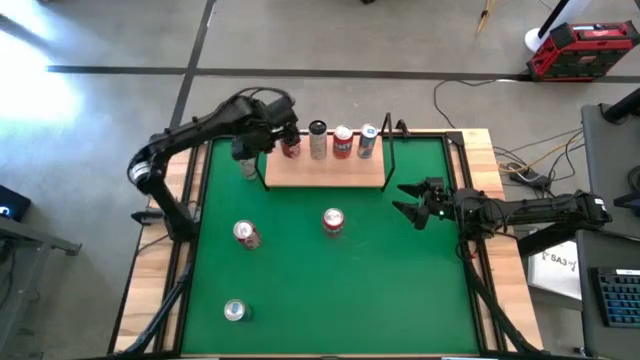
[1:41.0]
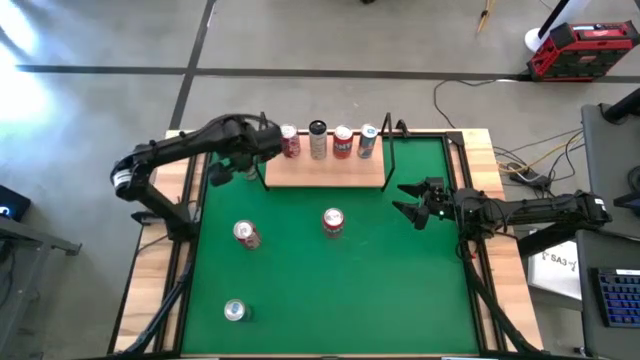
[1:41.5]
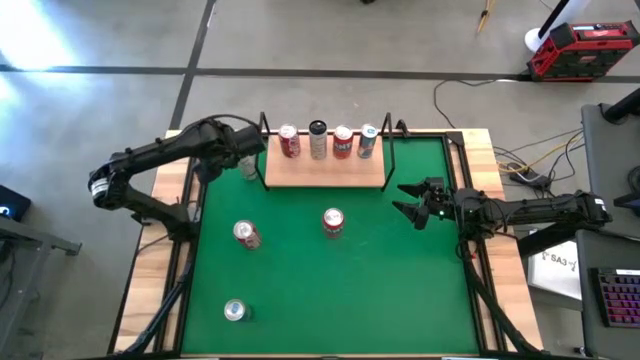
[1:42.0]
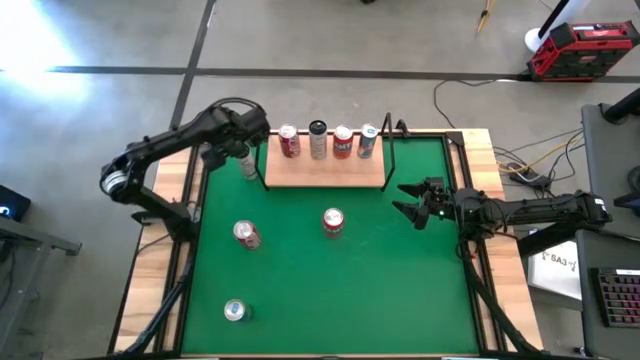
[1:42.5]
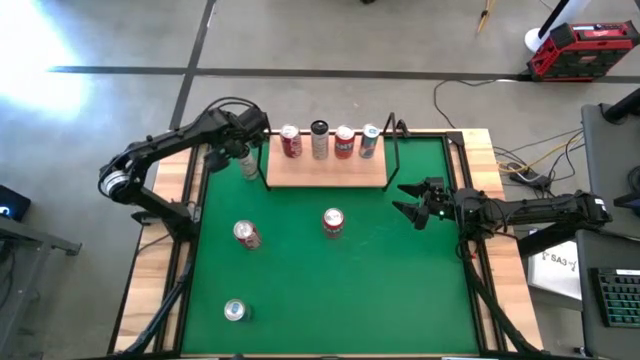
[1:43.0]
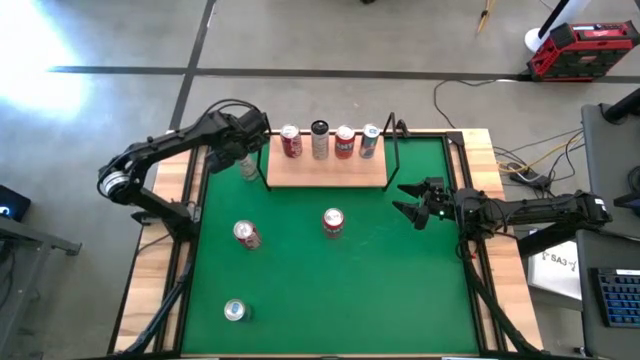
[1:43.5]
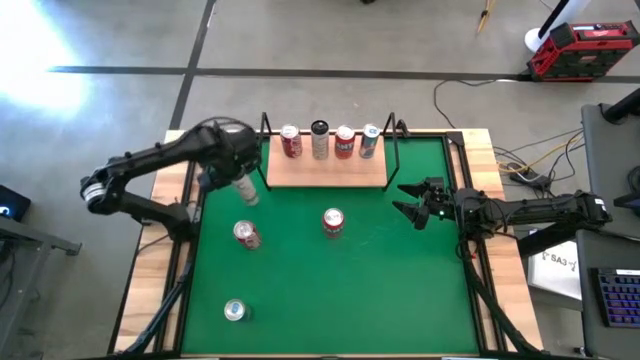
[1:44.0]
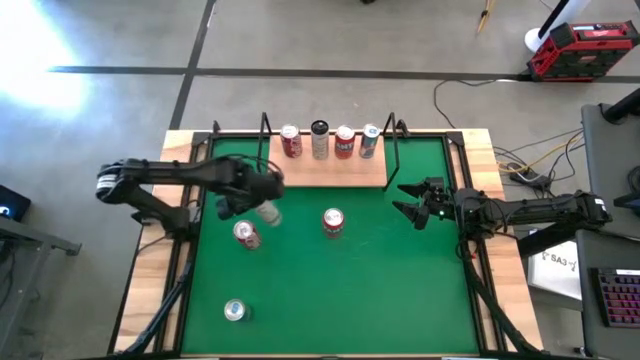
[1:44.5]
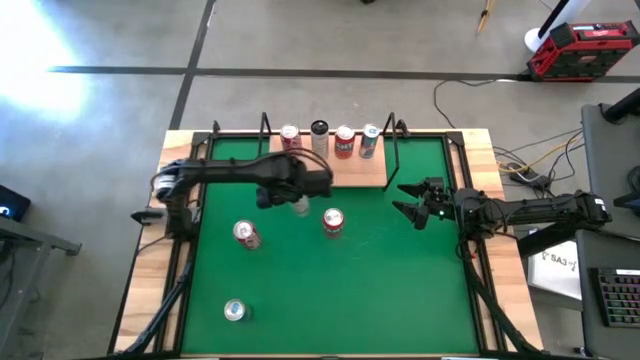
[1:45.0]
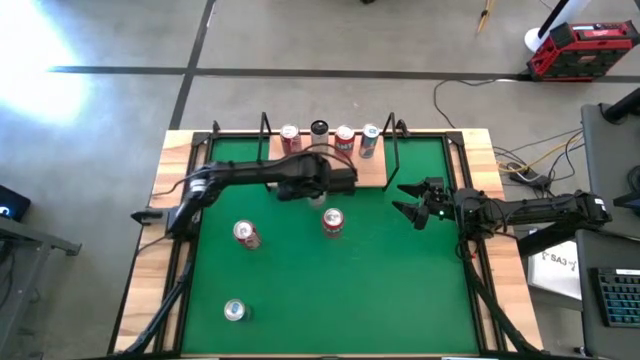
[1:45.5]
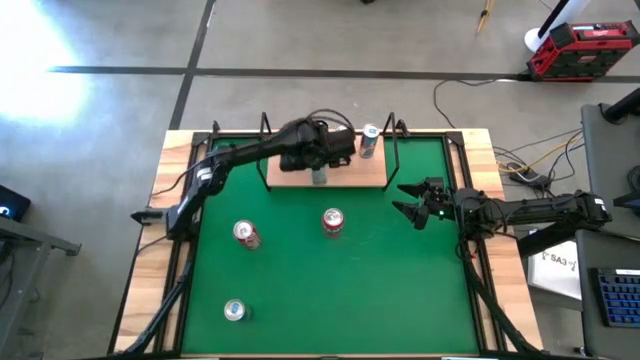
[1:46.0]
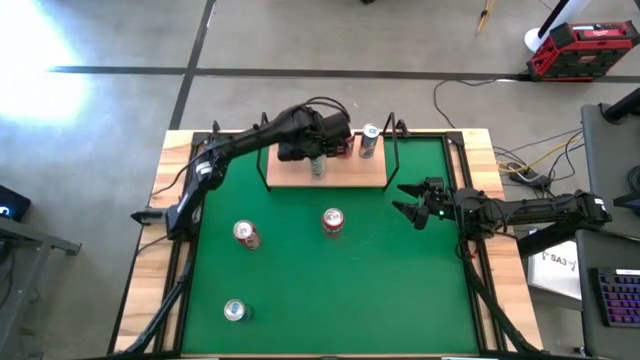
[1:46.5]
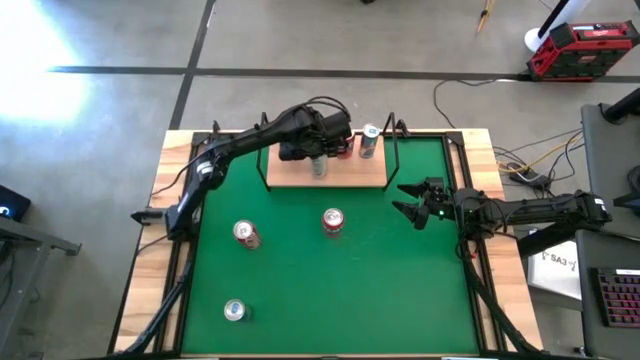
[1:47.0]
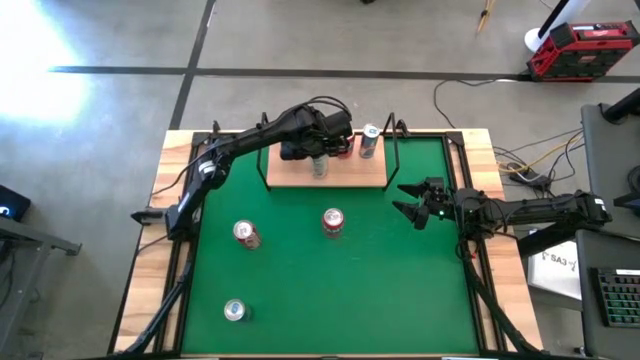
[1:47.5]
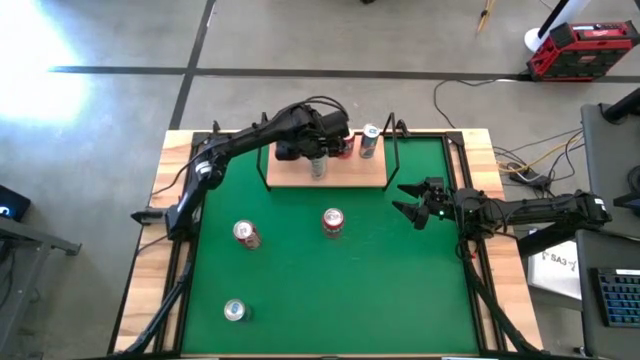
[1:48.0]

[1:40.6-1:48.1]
Task: Place canned beverage on shelf
Put the white-yellow soda can on the shelf aligned with the other white-yellow soda can

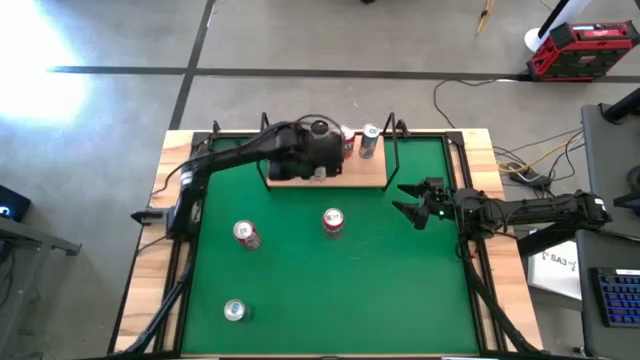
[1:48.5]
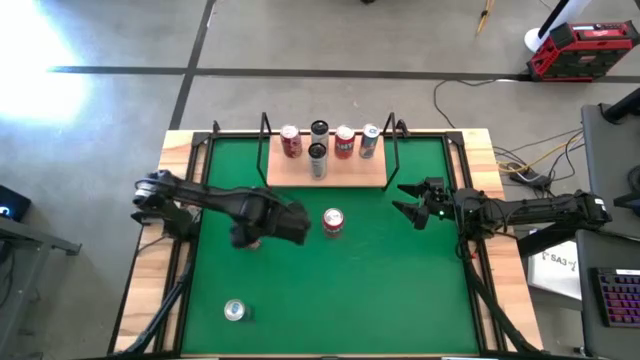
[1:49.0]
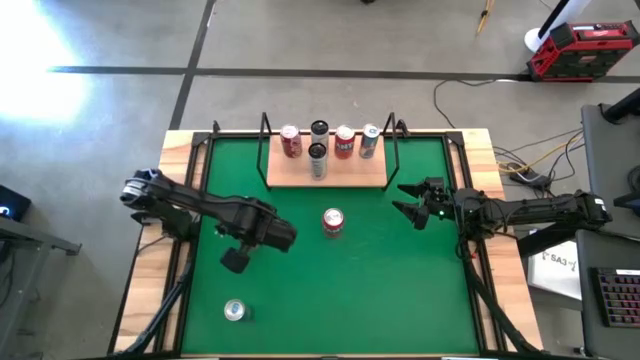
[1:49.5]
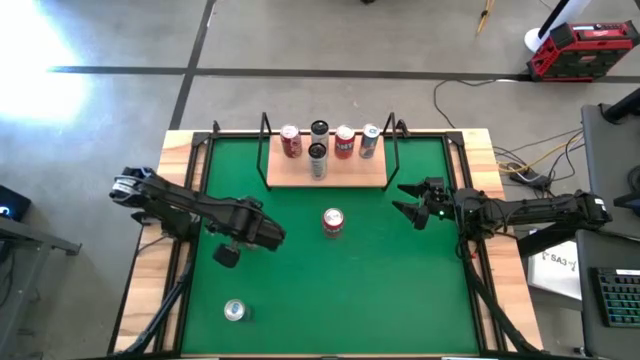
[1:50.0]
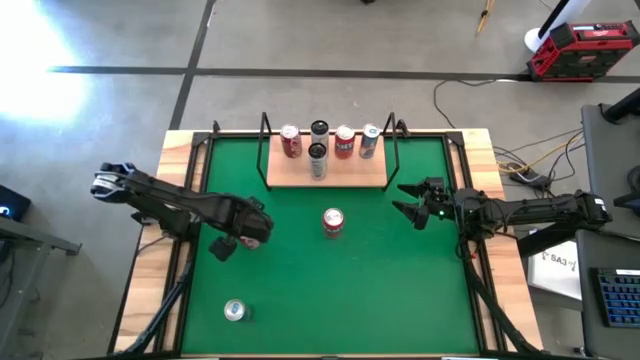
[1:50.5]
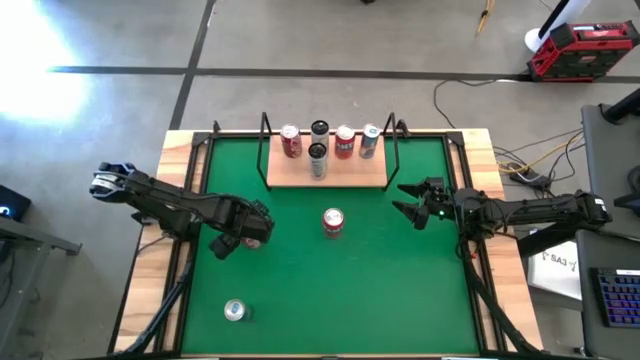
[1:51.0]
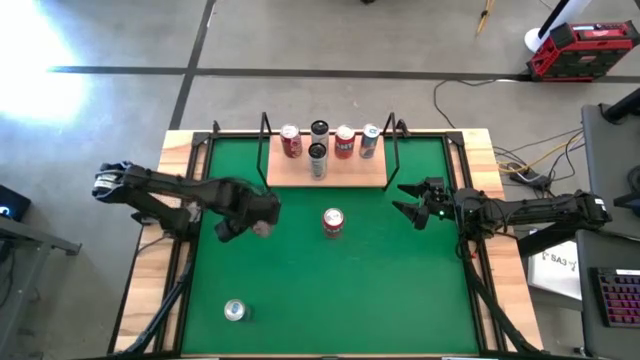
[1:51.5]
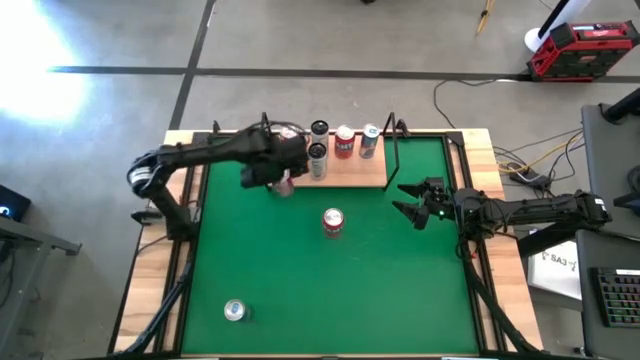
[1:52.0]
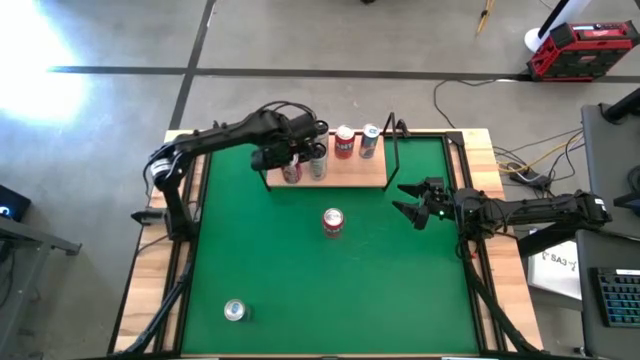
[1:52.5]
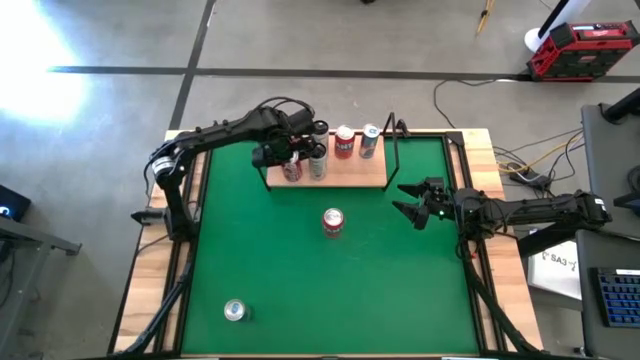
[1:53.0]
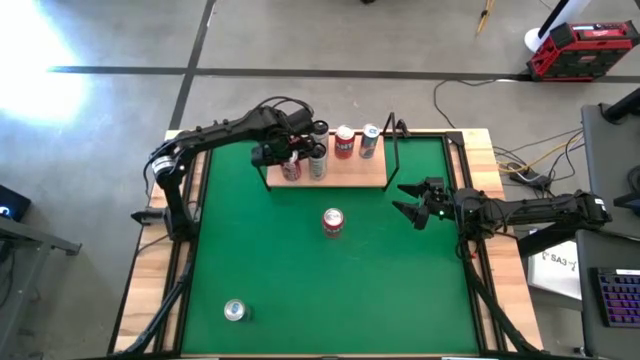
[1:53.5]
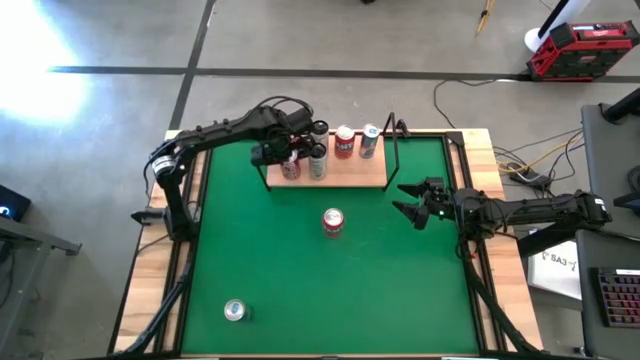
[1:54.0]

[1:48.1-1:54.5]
Put the red-white soda can on the shelf aligned with the other red-white soda can

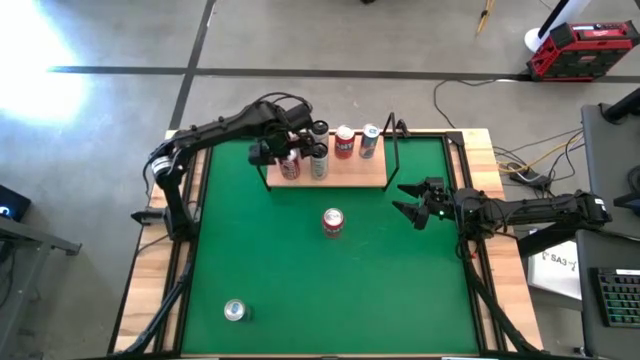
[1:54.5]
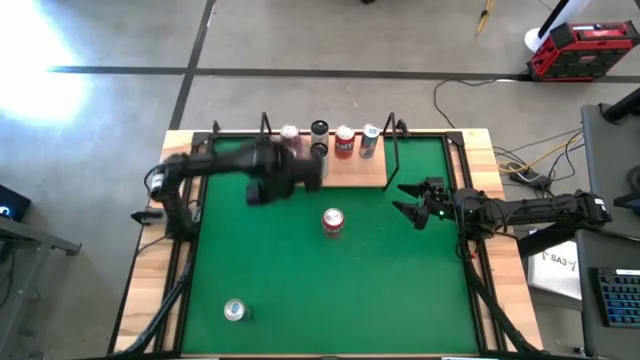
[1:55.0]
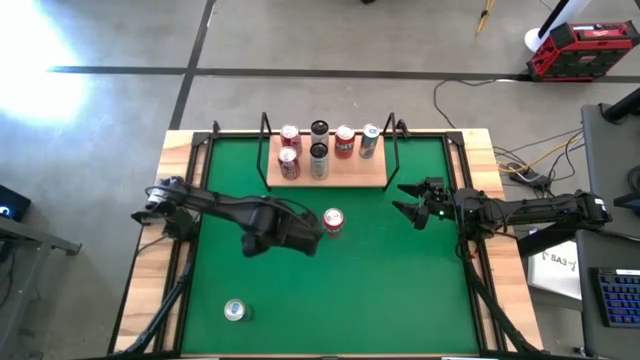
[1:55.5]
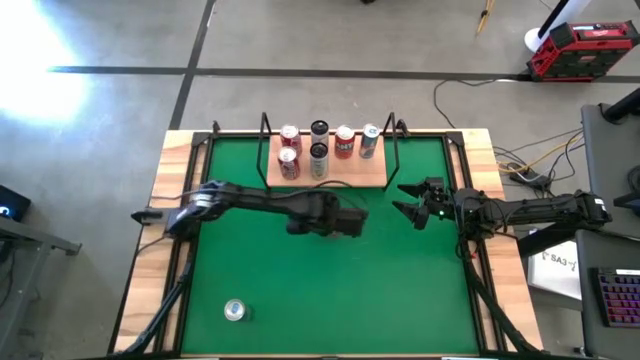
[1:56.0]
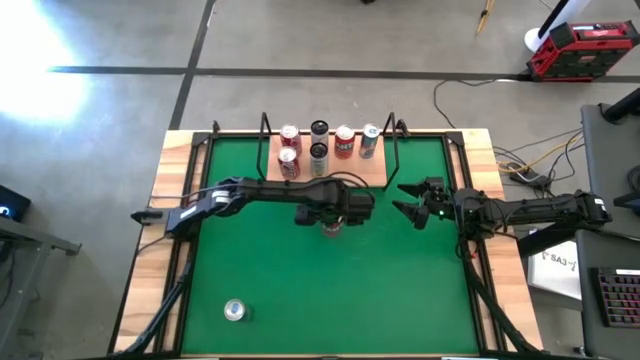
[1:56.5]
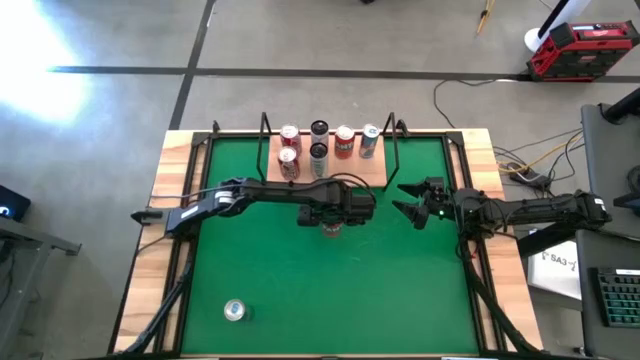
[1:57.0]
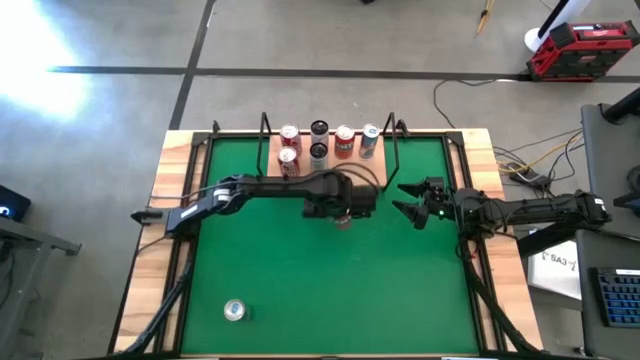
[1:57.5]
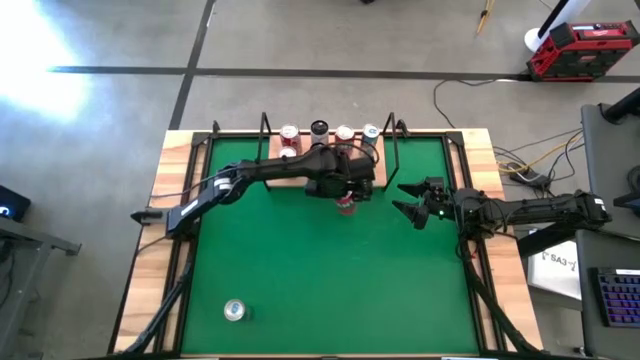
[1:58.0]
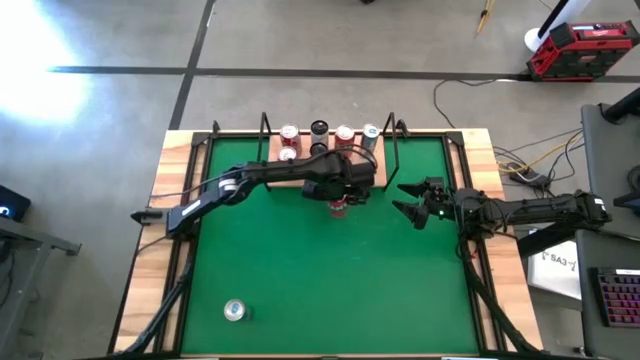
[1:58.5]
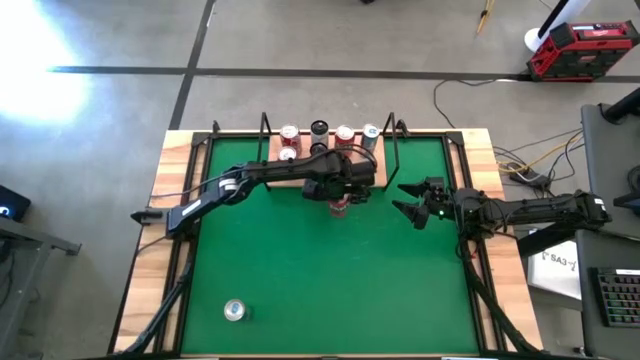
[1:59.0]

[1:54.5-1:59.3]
Adjust the red-white soda can on the table
